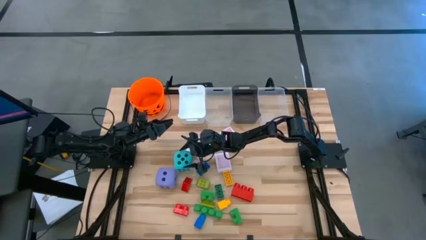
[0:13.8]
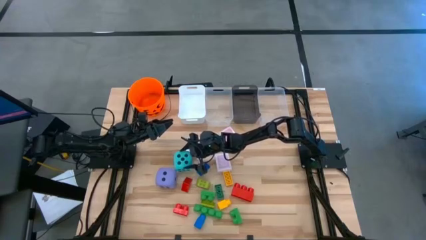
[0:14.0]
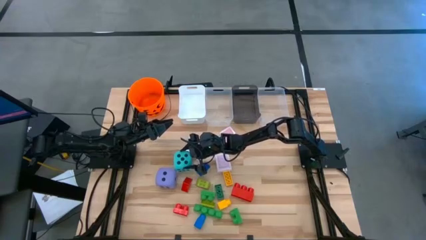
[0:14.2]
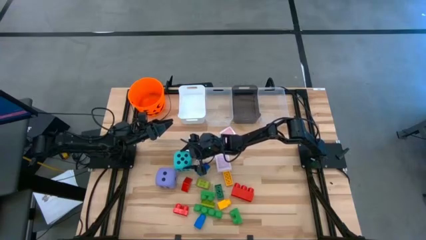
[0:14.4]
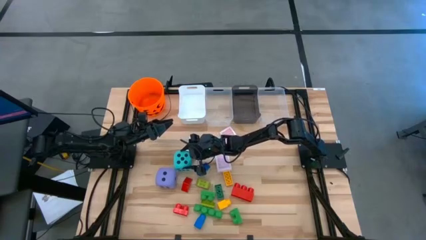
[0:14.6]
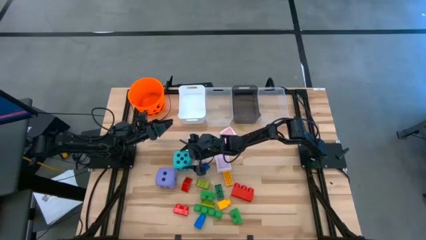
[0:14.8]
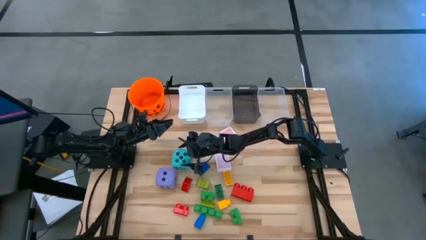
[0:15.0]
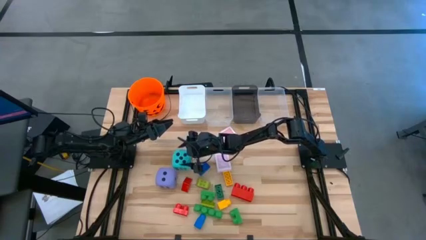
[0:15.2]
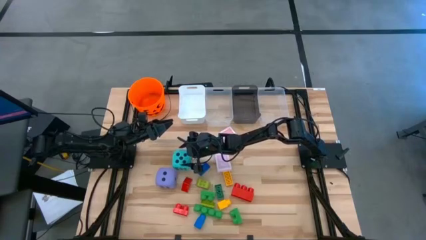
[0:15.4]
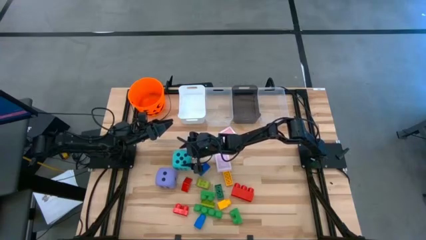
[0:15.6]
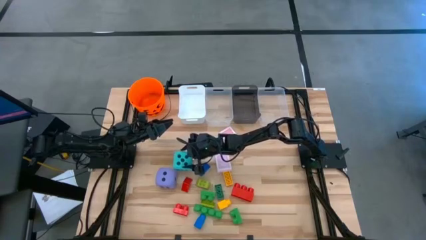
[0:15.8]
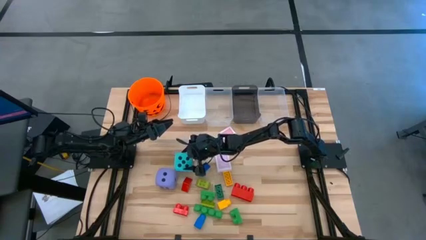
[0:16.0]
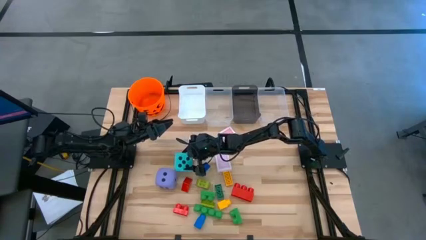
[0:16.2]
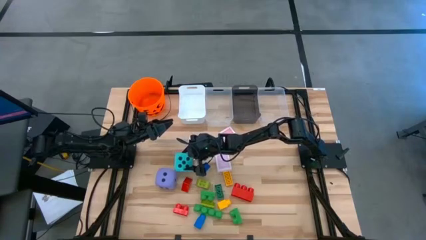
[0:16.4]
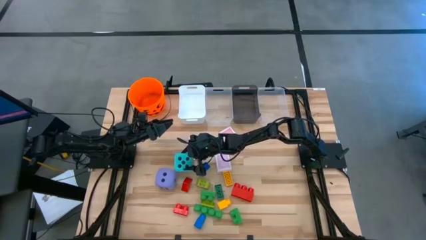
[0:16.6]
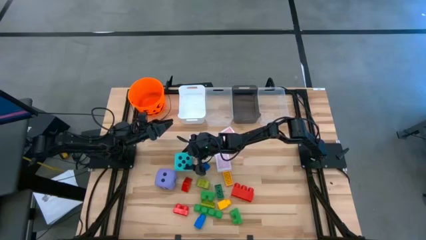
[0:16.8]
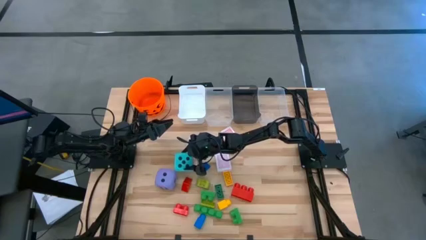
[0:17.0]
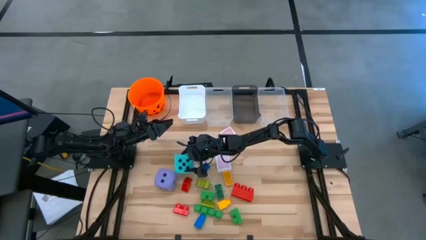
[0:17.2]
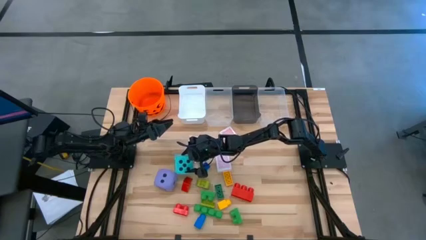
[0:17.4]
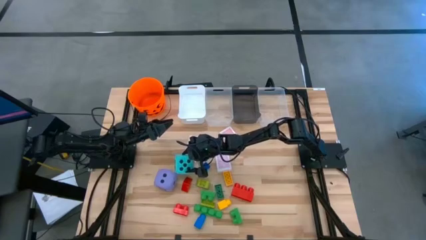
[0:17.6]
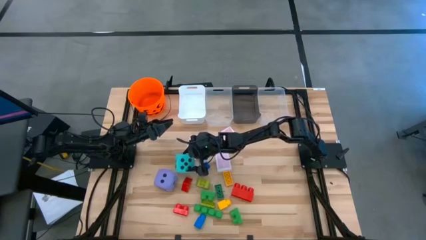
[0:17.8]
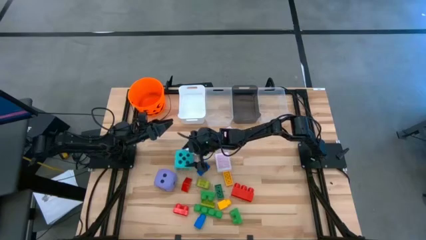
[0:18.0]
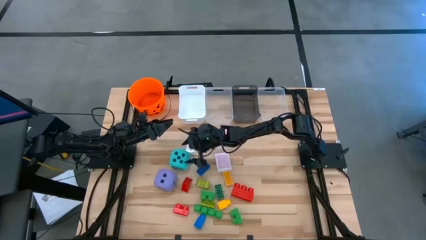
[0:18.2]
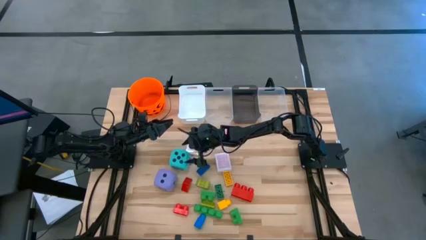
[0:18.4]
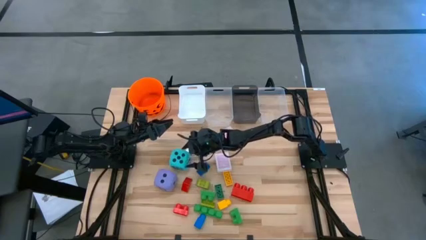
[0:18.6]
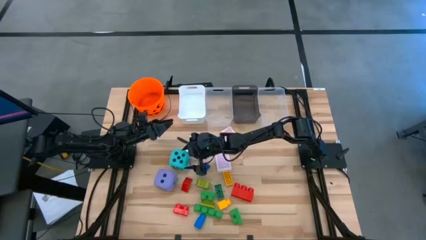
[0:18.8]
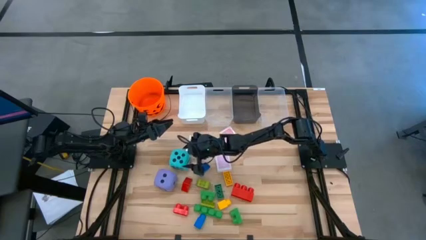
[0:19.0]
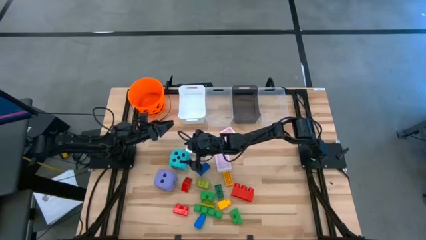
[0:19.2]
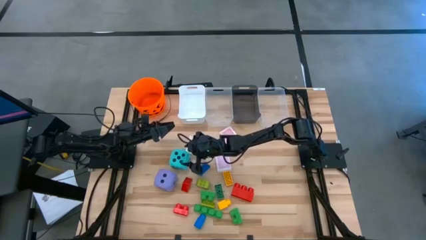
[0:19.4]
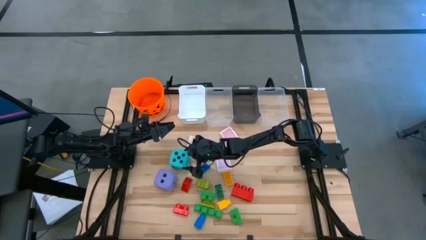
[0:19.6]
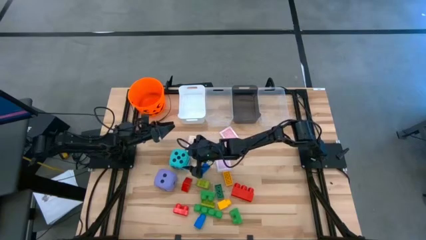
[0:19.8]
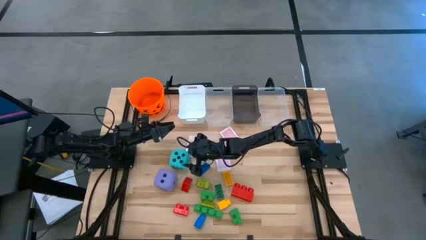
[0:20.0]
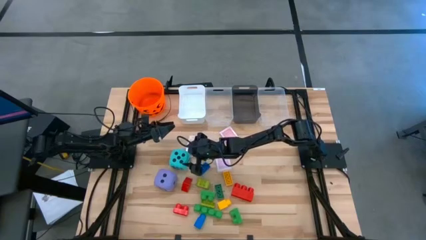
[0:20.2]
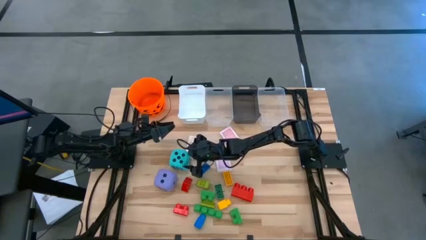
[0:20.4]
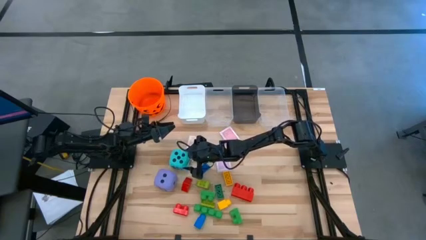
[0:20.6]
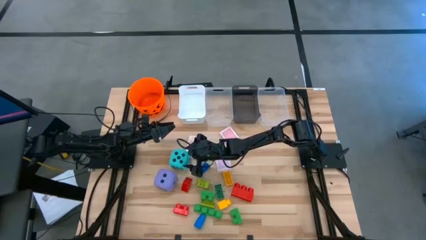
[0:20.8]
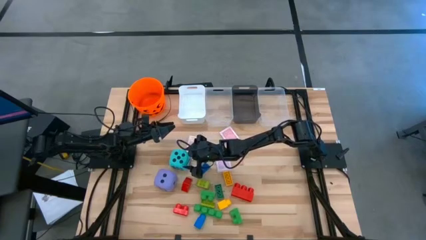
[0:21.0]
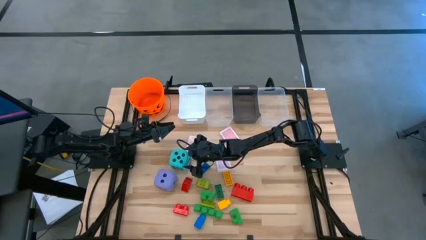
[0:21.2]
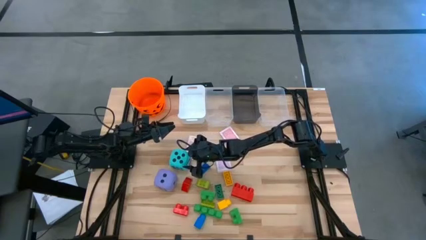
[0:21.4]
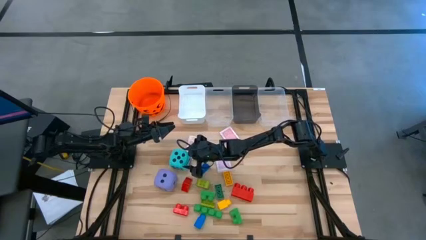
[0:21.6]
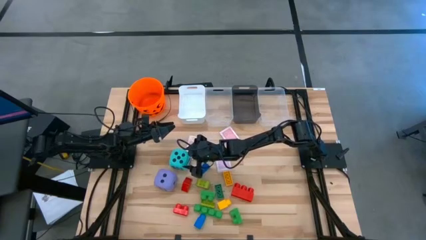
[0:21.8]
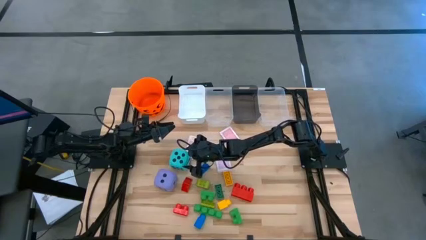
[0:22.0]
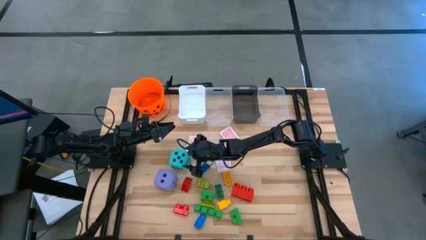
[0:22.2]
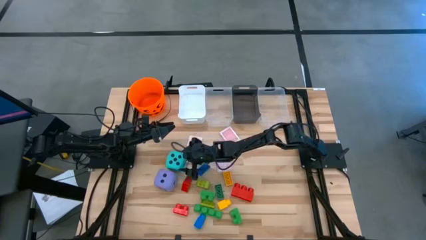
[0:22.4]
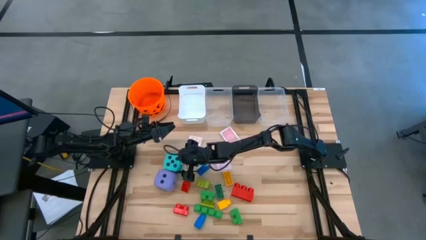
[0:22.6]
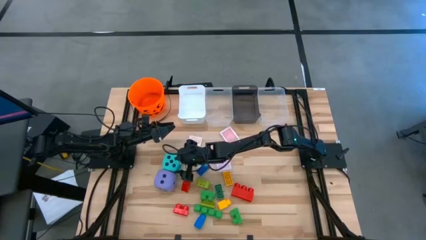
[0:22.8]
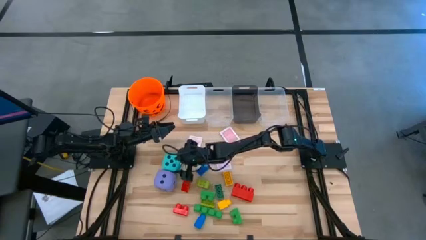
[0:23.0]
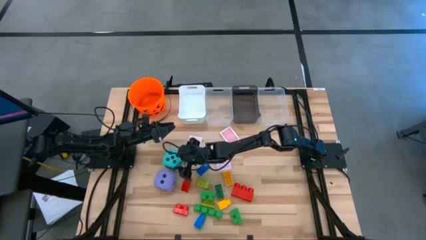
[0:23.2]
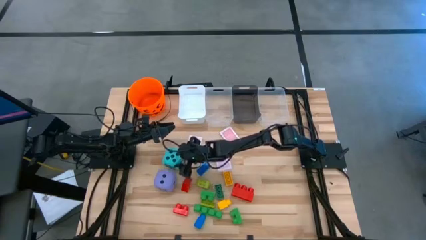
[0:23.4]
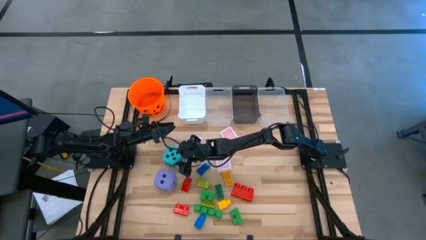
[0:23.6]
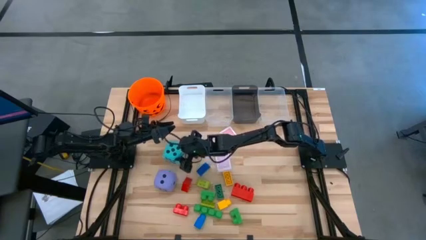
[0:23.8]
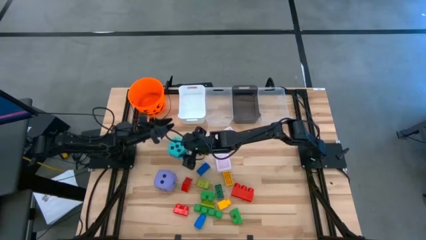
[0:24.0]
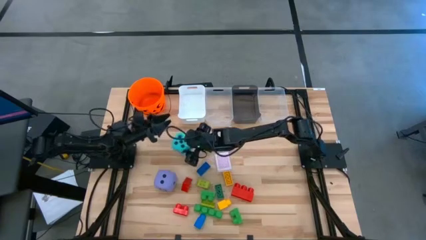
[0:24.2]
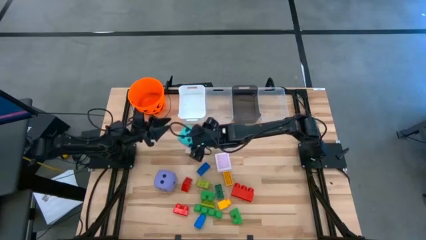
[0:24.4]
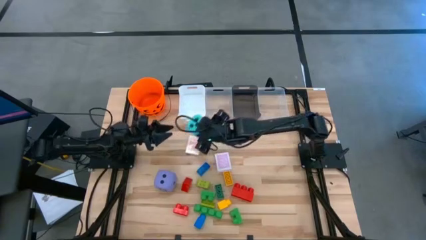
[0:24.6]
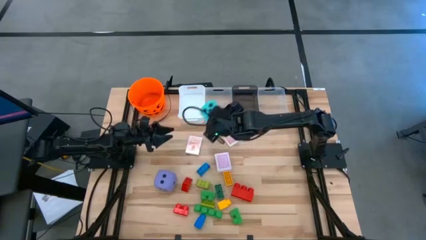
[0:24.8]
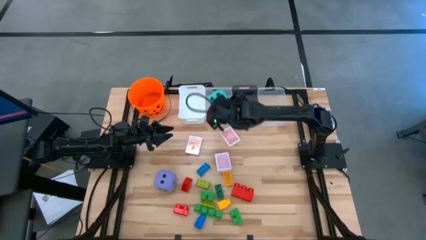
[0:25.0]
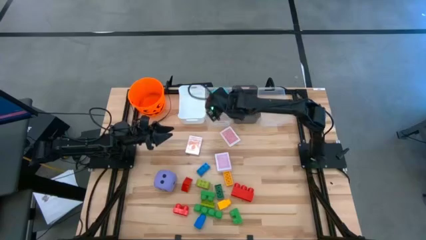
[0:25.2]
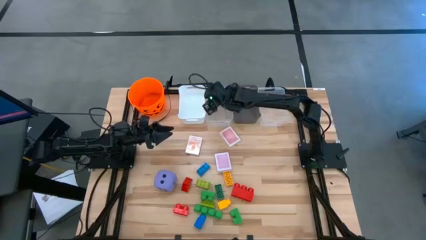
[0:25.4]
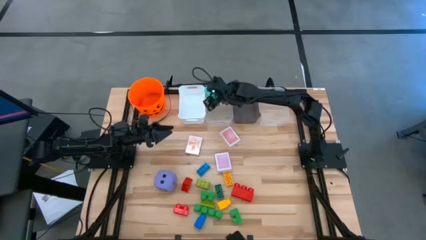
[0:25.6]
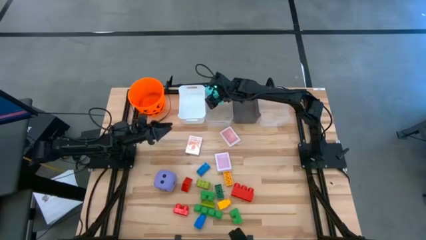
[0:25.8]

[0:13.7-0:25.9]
Task: Pick & Place Toys
Put the blue dice into the left transparent bin
